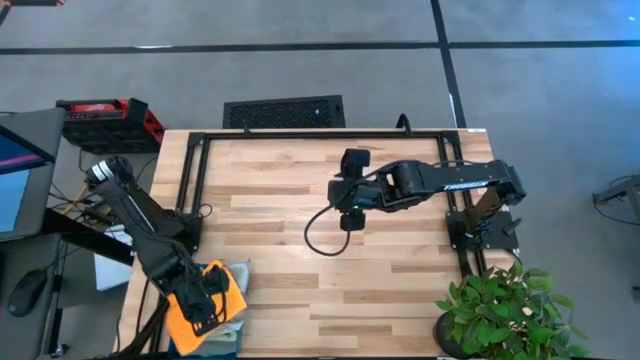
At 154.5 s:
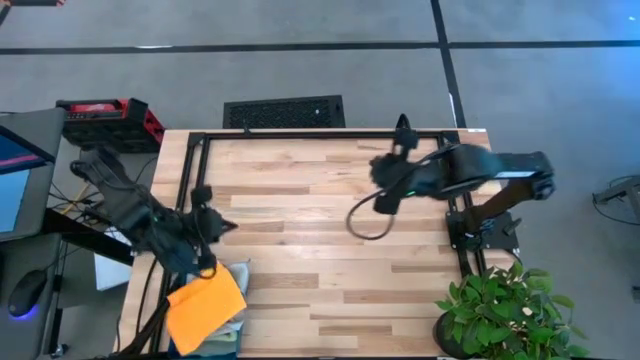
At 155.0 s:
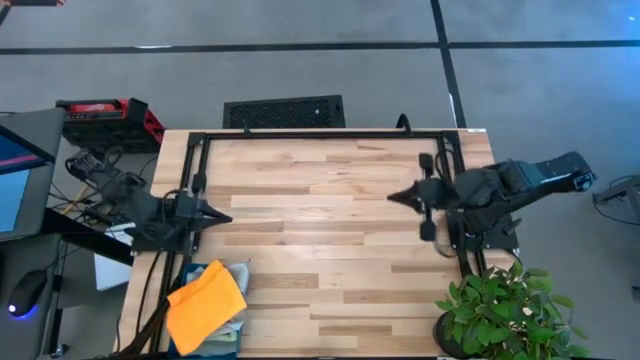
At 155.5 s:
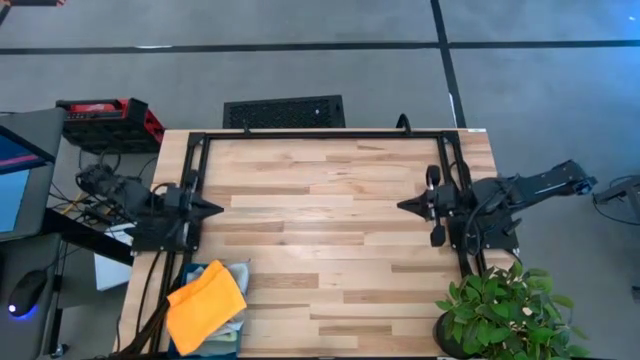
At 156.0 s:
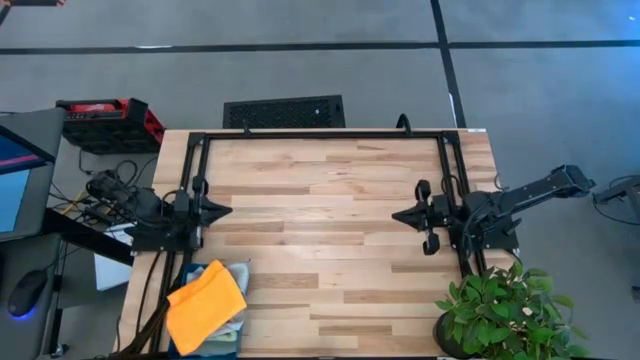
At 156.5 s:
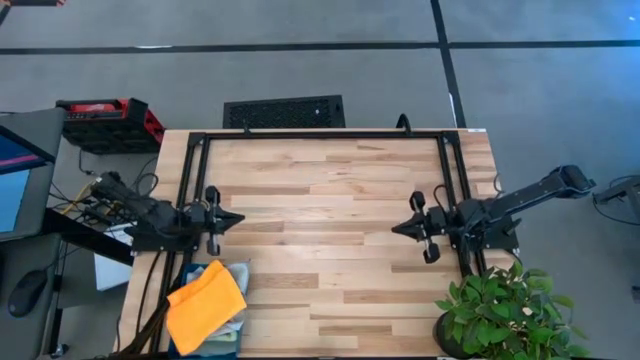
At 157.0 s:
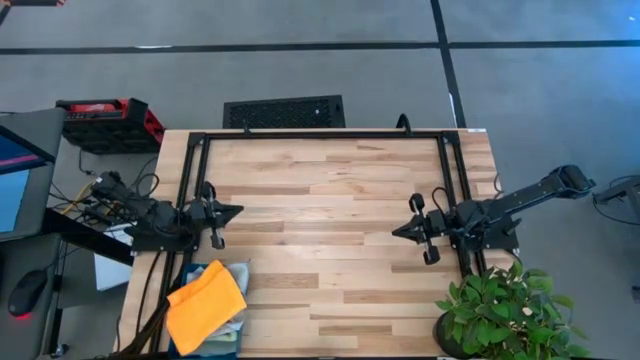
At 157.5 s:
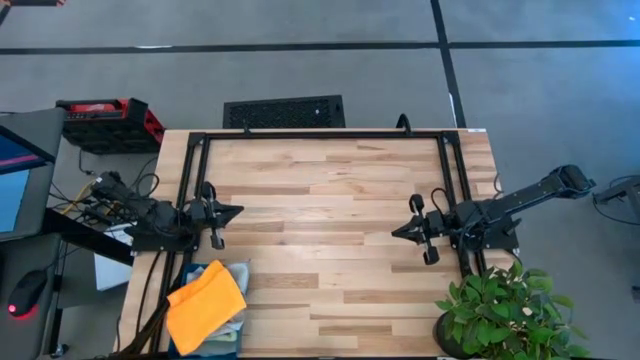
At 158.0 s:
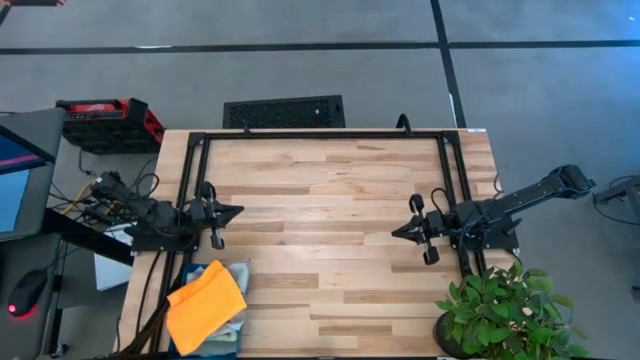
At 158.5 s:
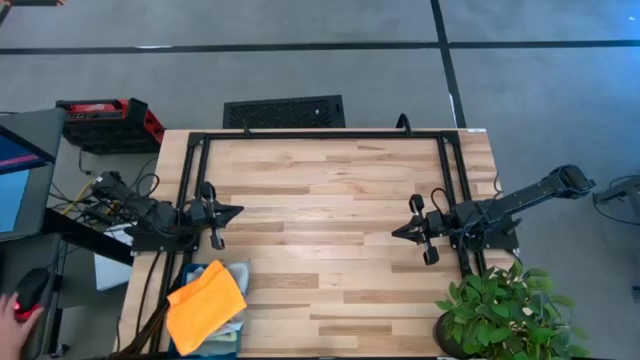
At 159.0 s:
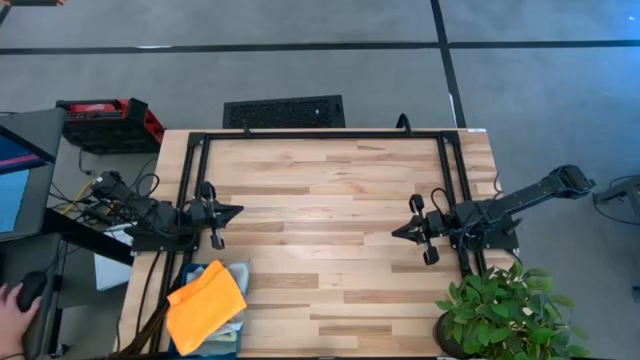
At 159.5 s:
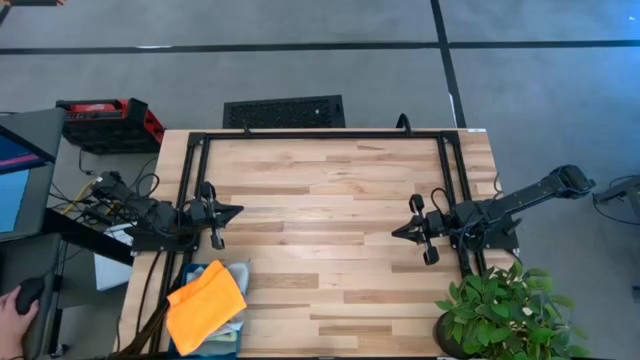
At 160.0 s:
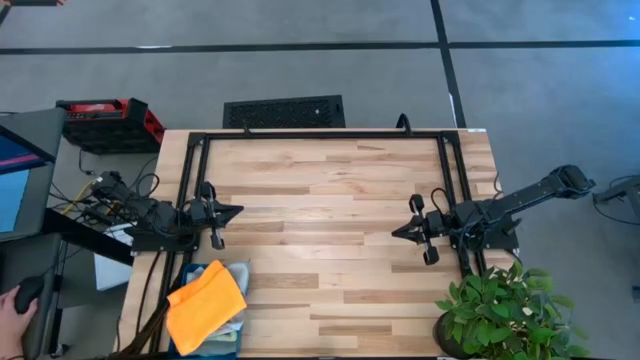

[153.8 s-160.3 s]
Task: Fold microfiber towels
Return to Home Position

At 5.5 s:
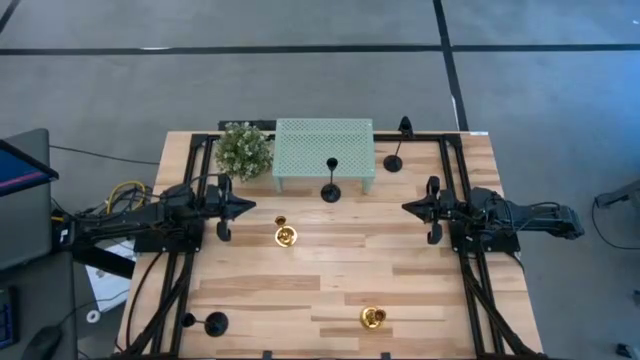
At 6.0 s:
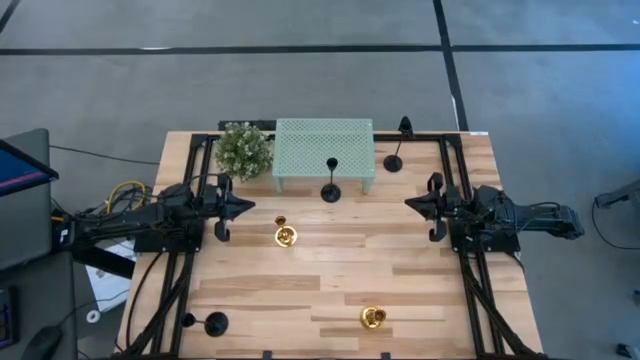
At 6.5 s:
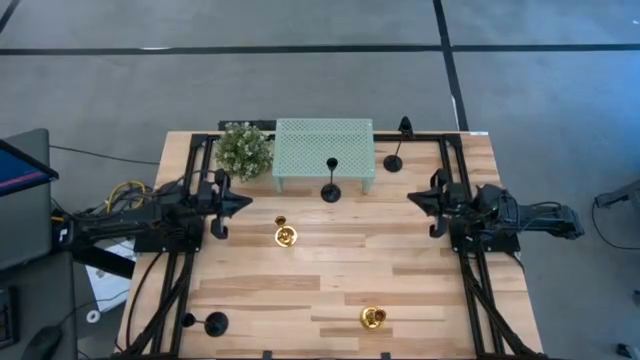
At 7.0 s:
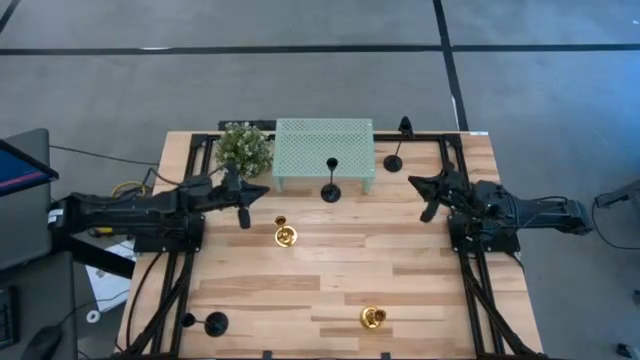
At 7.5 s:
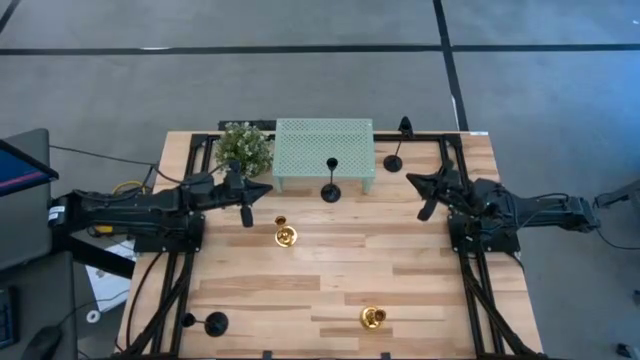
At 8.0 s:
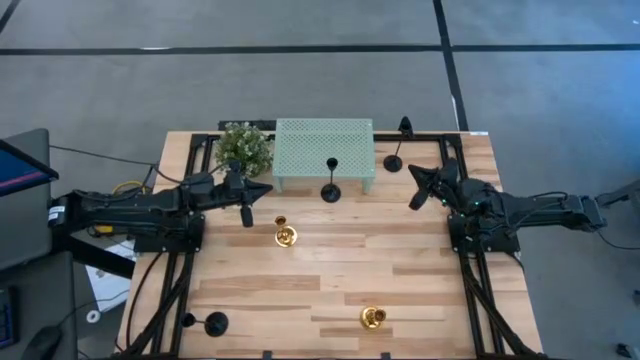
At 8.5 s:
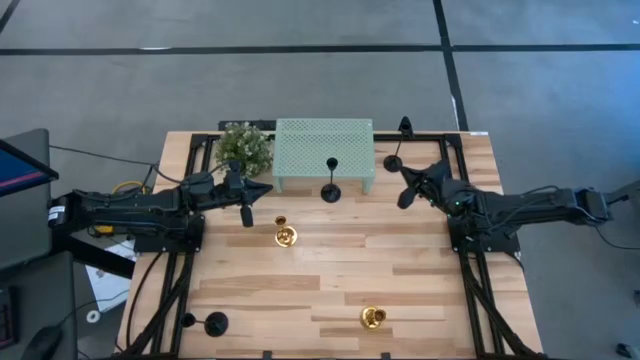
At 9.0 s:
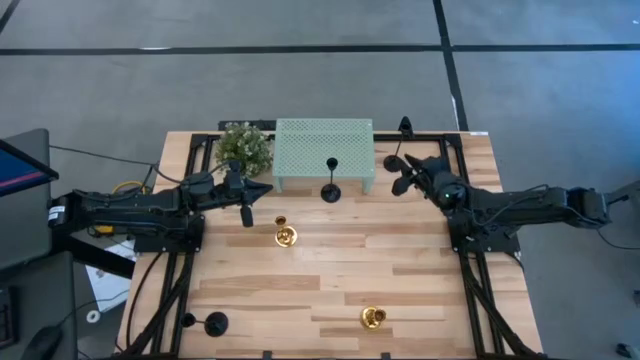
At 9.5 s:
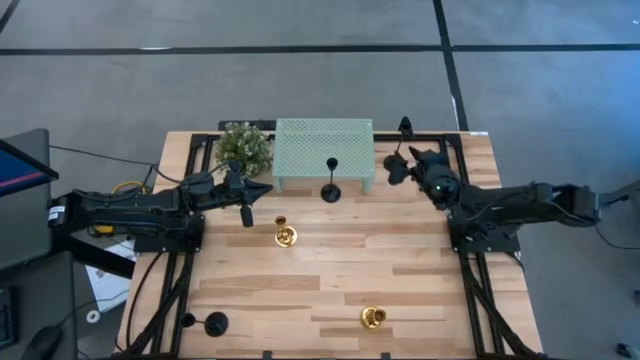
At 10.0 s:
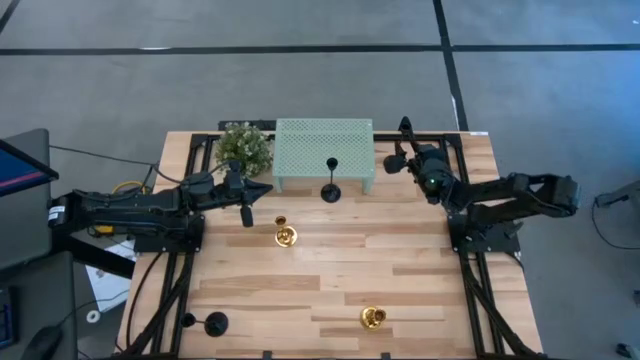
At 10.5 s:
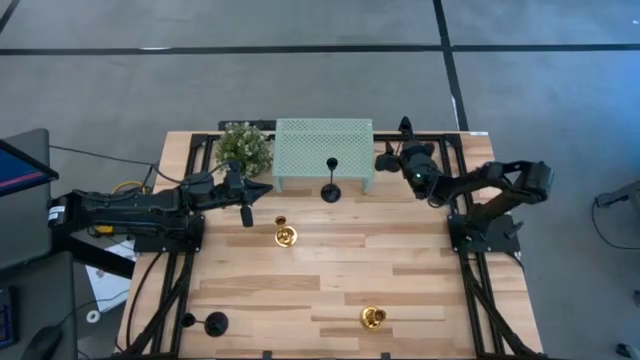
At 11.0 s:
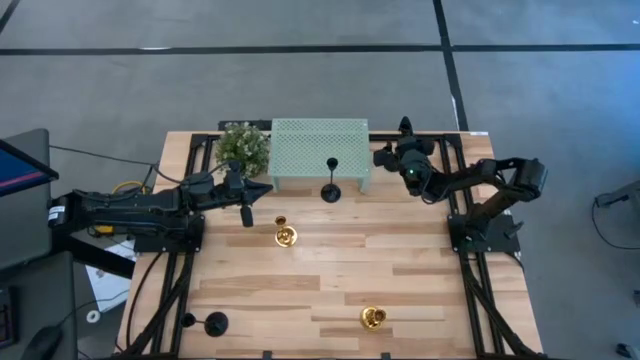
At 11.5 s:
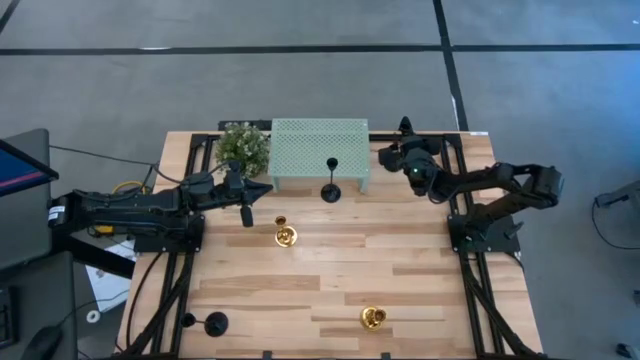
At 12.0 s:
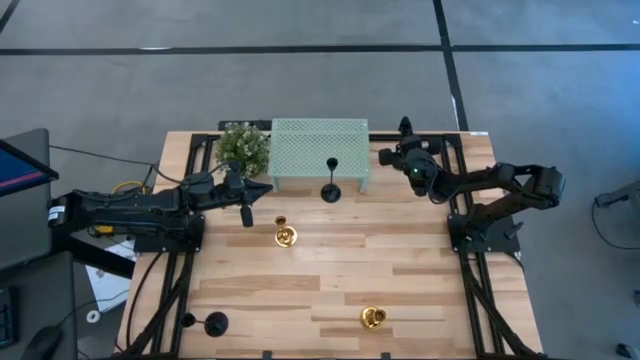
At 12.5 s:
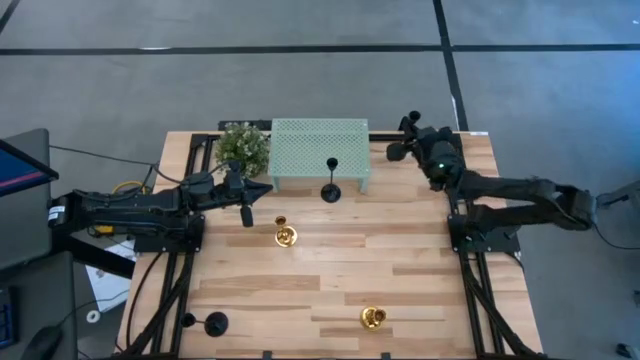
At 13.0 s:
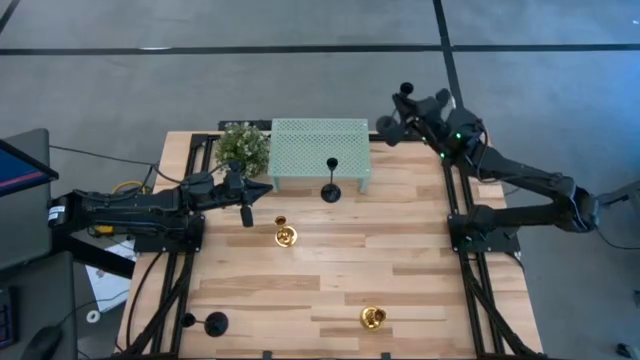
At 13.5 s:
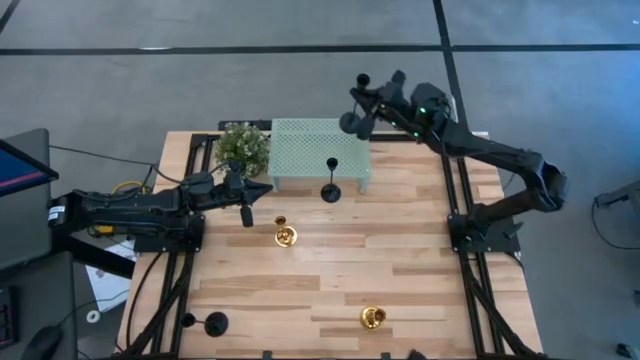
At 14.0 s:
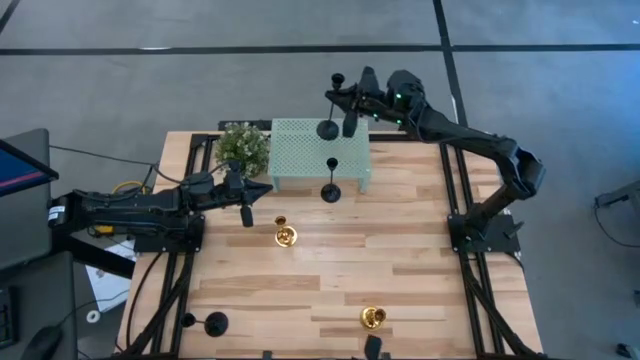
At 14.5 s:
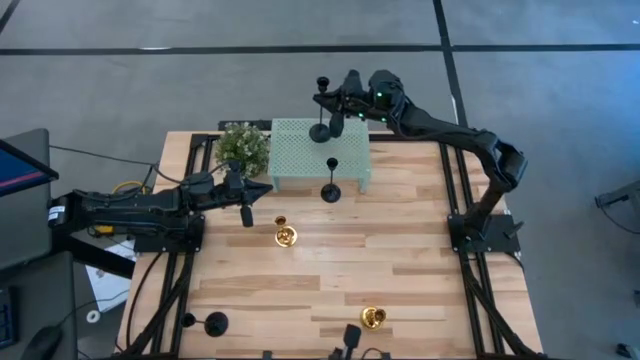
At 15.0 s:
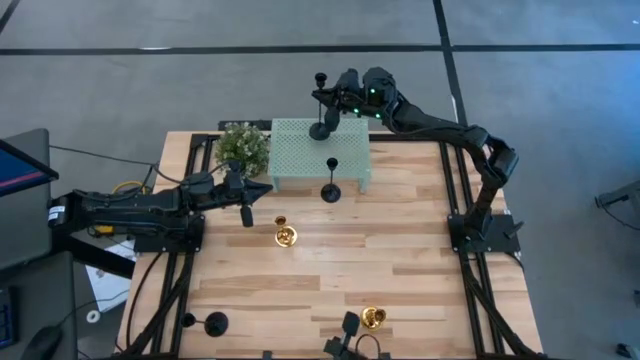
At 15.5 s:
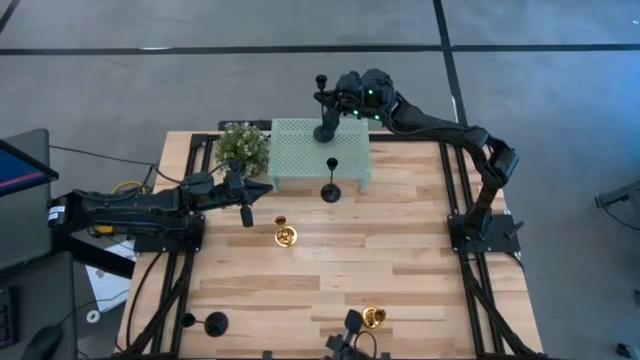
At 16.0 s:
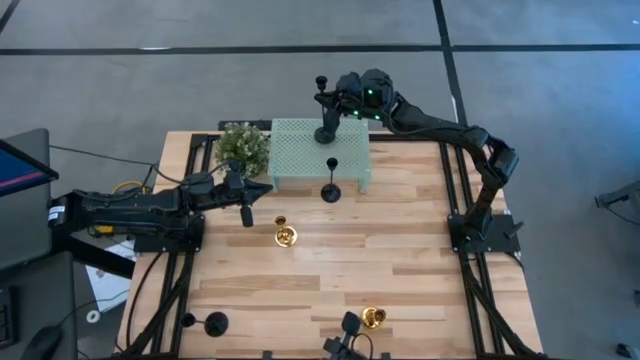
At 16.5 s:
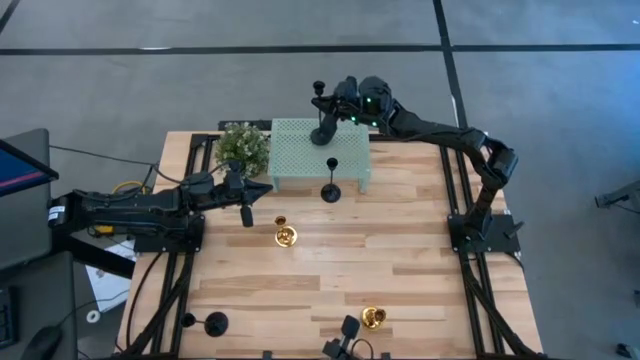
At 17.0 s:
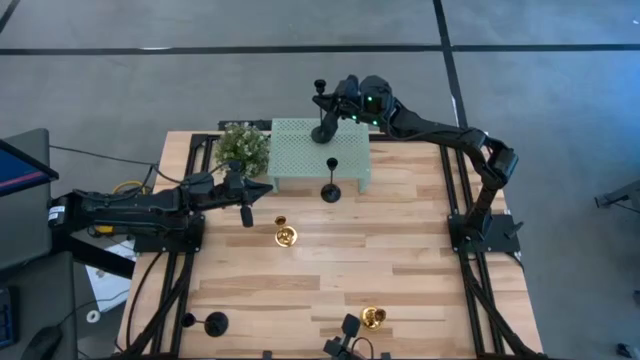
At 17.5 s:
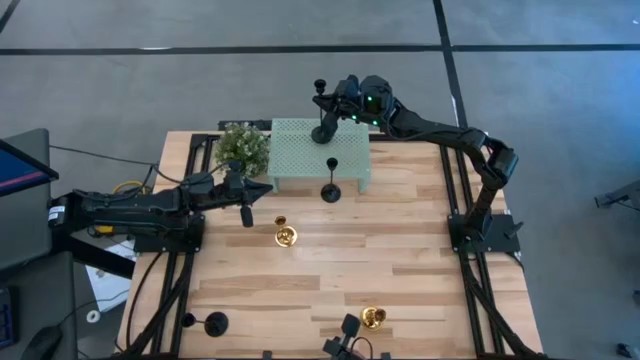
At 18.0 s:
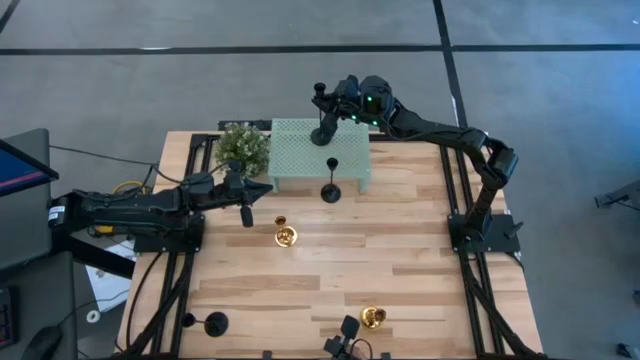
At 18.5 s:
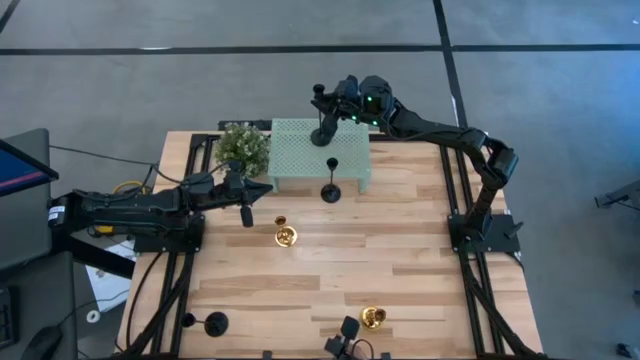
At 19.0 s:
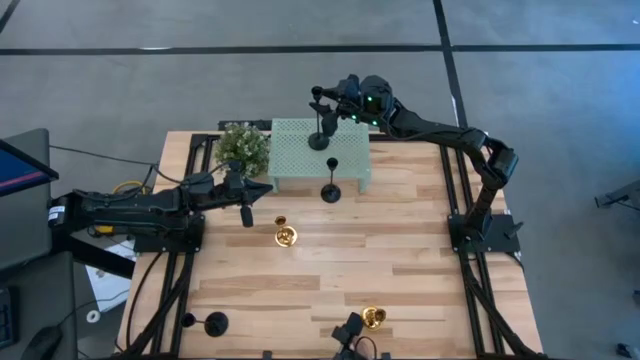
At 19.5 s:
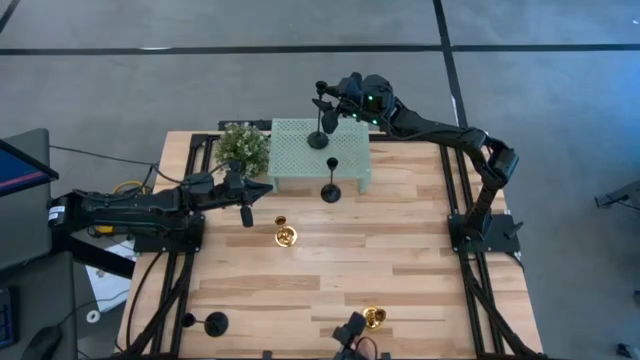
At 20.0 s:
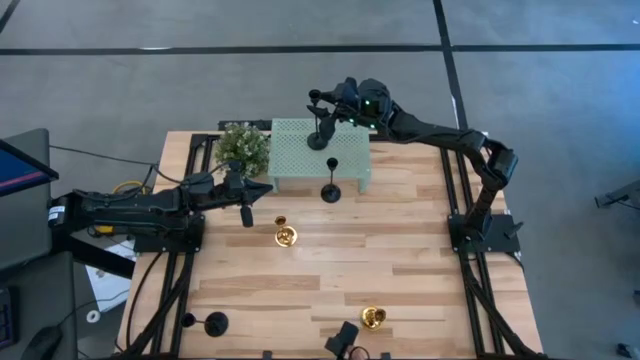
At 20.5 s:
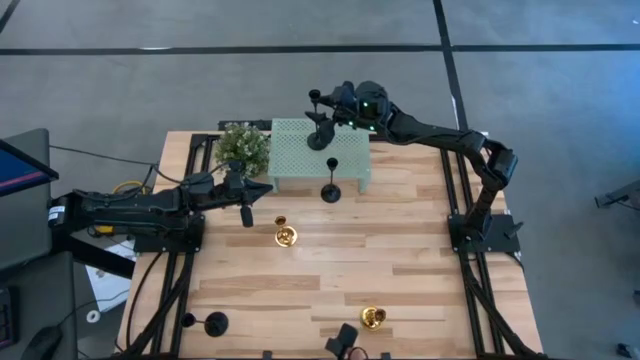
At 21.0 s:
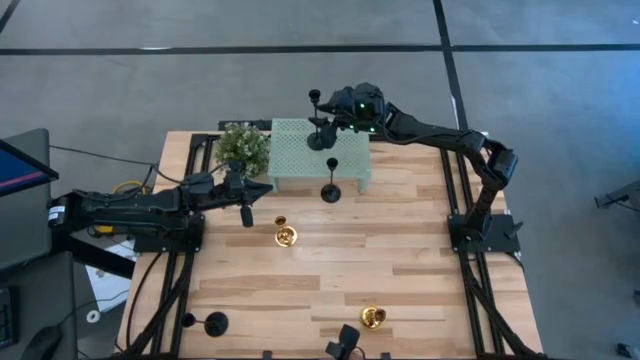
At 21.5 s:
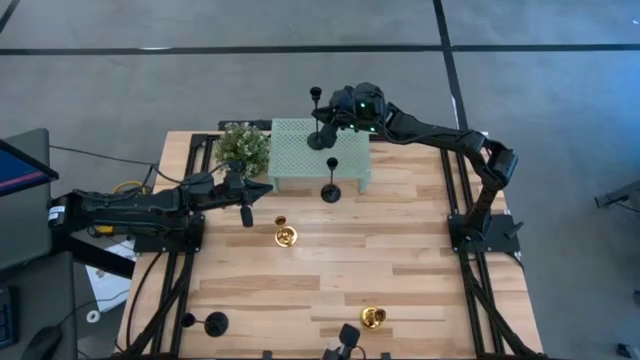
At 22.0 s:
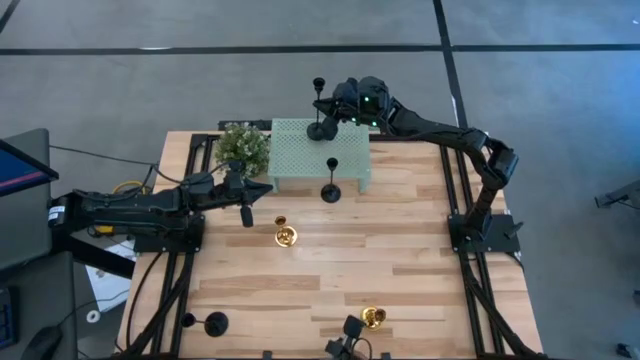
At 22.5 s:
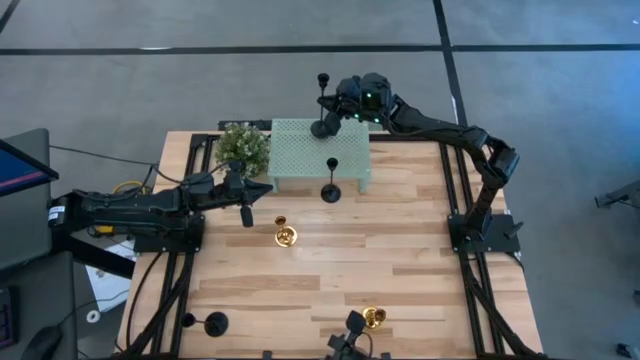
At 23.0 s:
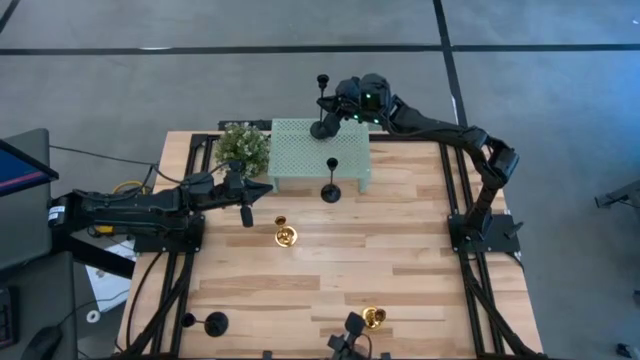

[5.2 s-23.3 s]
Task: Pick & Place candle stick holders
Put the top right black candle holder on the shelf
